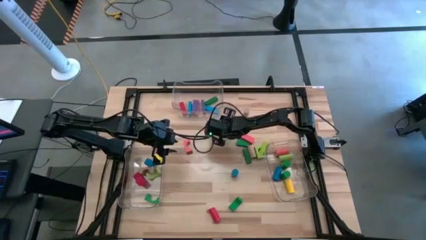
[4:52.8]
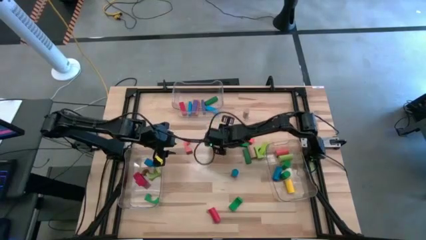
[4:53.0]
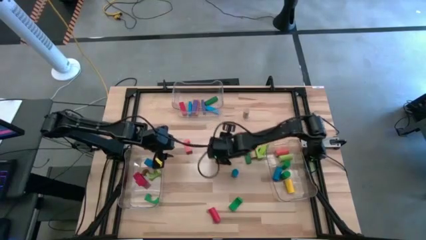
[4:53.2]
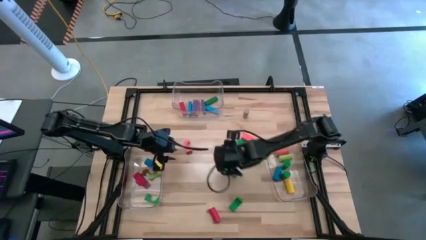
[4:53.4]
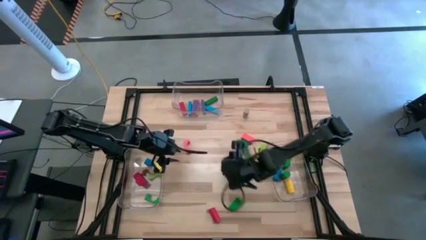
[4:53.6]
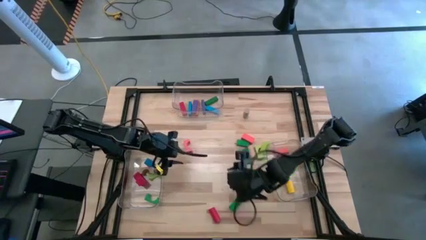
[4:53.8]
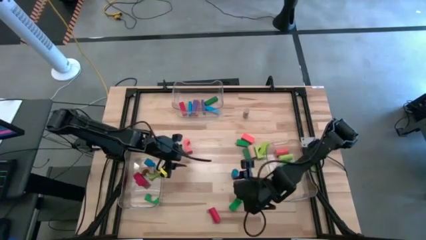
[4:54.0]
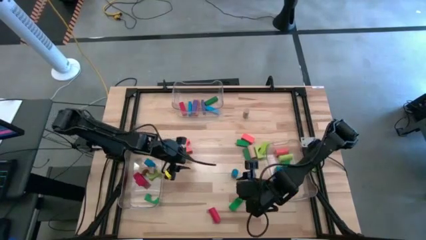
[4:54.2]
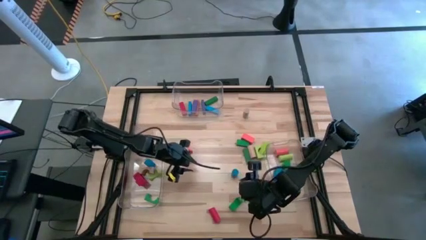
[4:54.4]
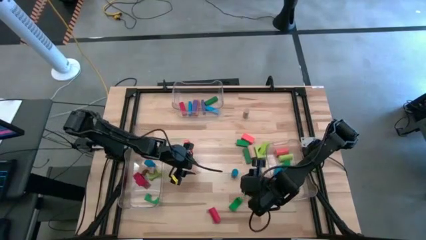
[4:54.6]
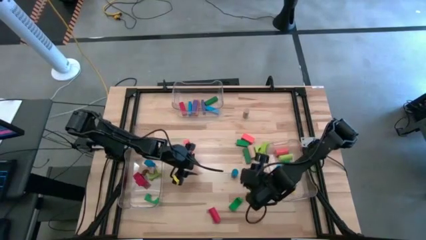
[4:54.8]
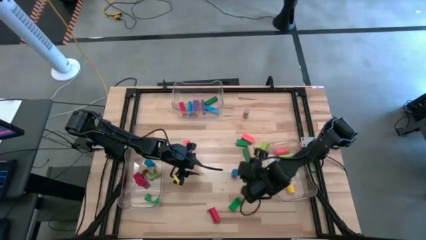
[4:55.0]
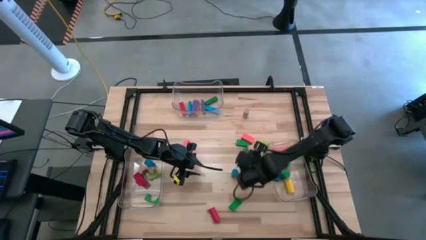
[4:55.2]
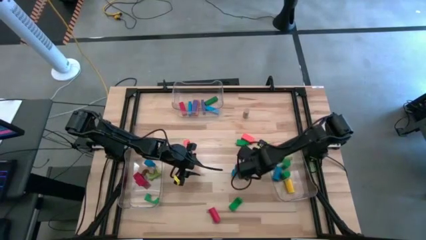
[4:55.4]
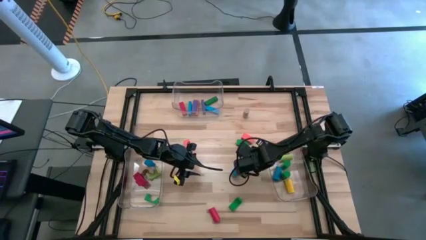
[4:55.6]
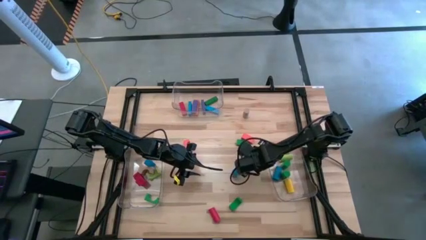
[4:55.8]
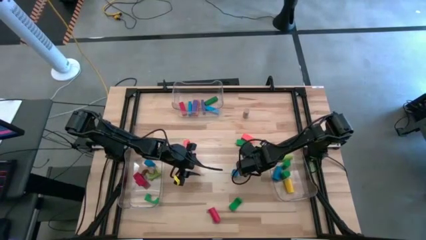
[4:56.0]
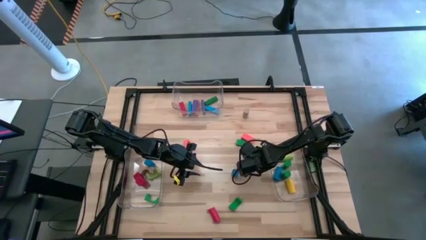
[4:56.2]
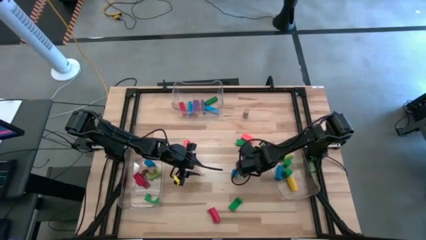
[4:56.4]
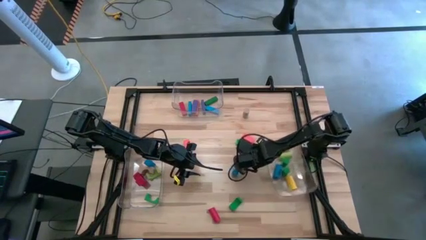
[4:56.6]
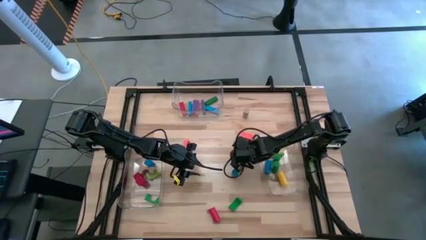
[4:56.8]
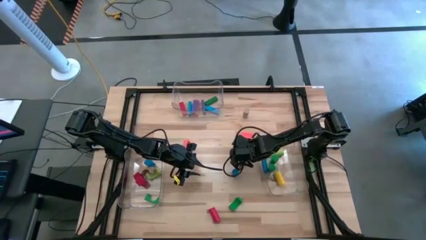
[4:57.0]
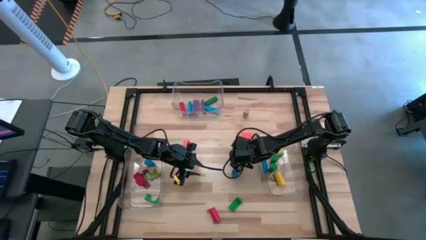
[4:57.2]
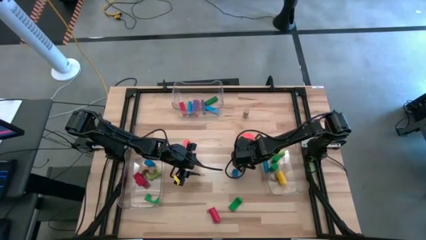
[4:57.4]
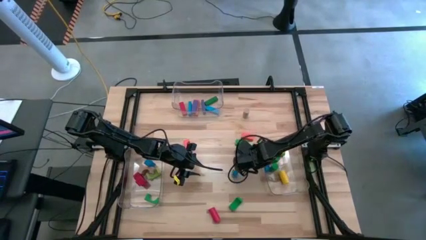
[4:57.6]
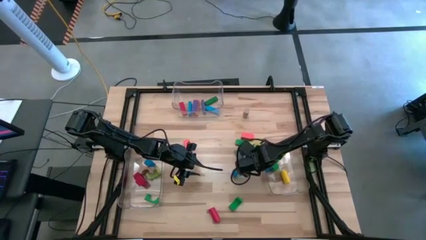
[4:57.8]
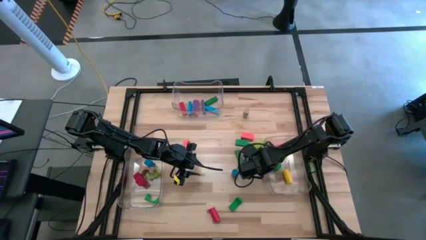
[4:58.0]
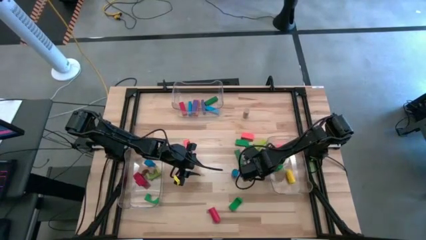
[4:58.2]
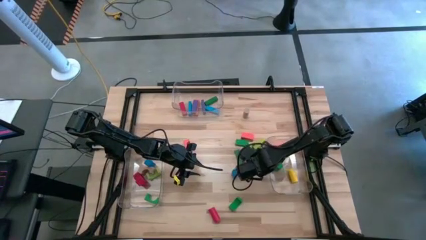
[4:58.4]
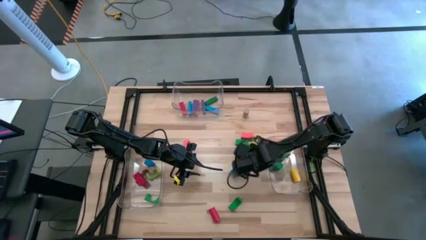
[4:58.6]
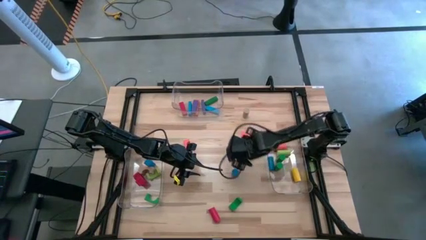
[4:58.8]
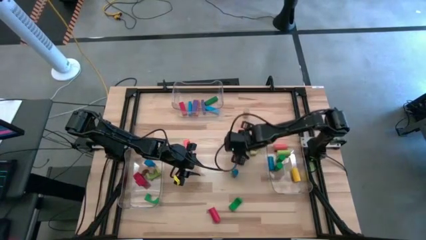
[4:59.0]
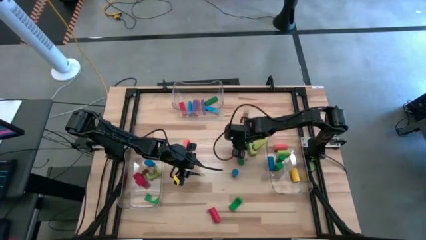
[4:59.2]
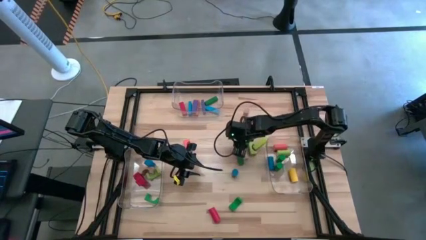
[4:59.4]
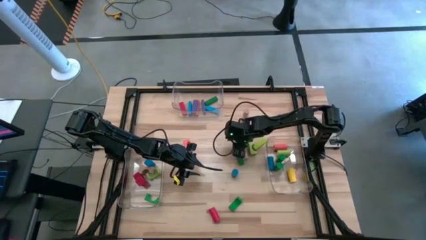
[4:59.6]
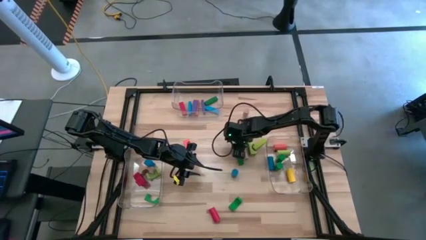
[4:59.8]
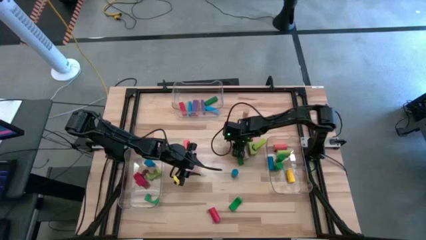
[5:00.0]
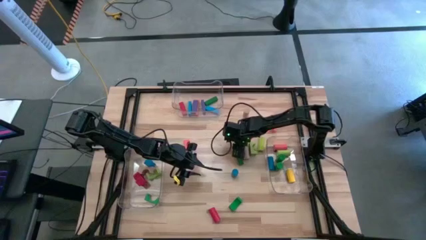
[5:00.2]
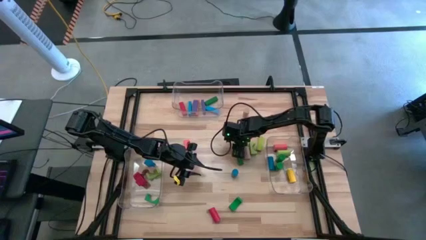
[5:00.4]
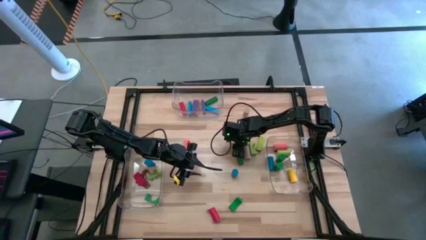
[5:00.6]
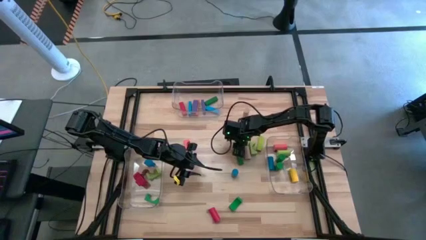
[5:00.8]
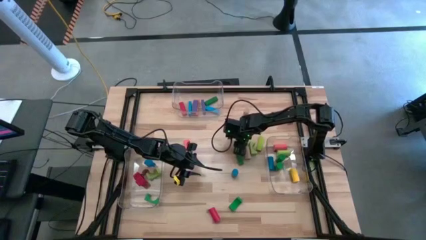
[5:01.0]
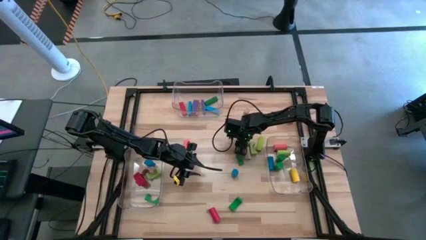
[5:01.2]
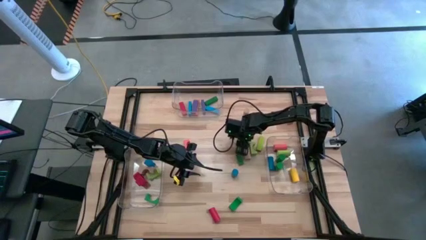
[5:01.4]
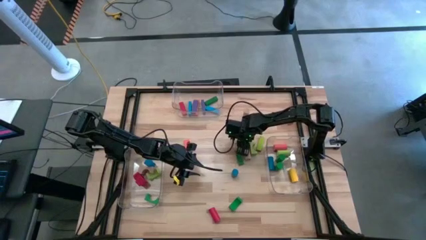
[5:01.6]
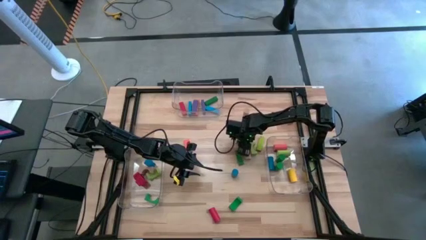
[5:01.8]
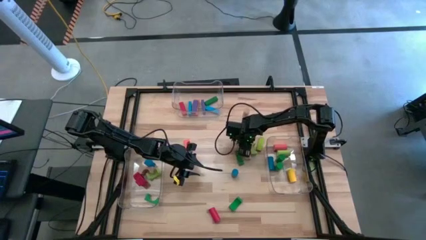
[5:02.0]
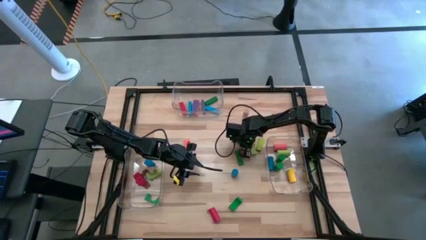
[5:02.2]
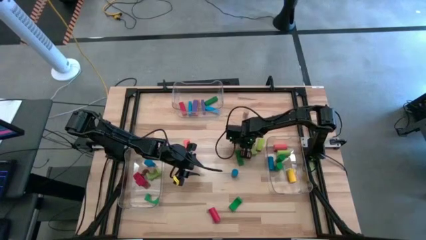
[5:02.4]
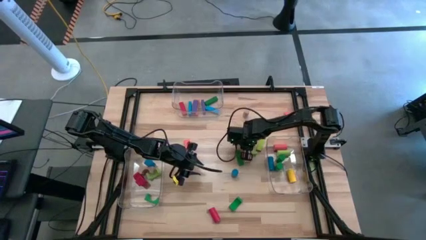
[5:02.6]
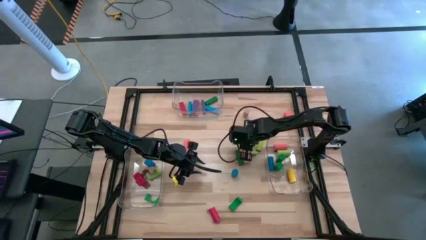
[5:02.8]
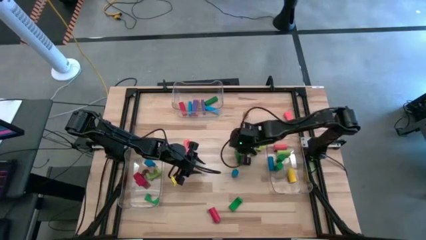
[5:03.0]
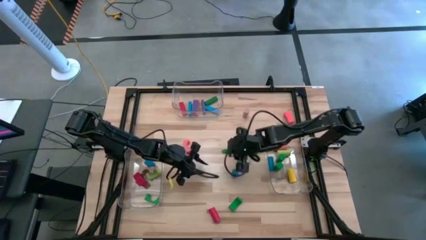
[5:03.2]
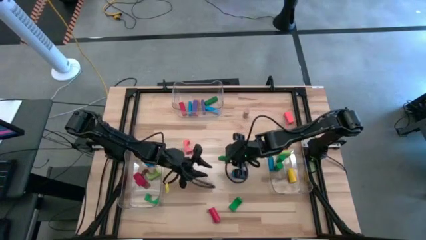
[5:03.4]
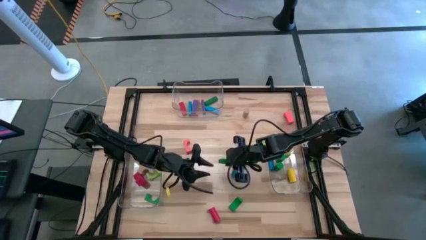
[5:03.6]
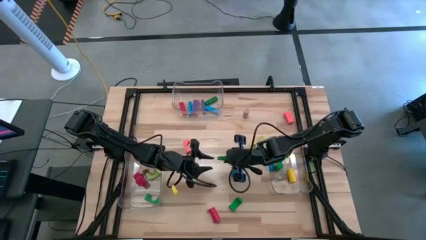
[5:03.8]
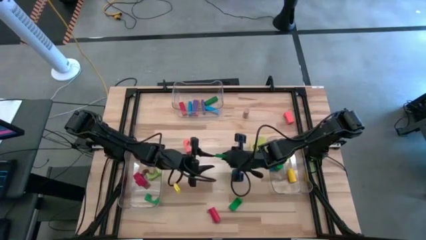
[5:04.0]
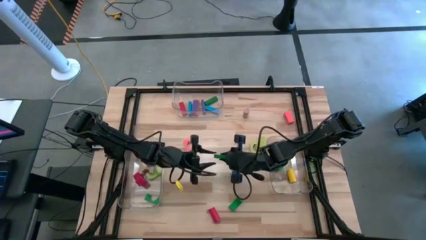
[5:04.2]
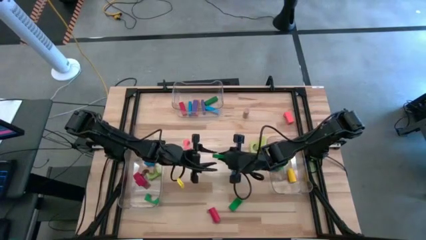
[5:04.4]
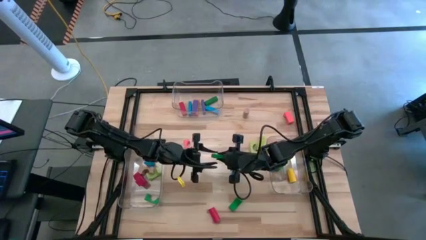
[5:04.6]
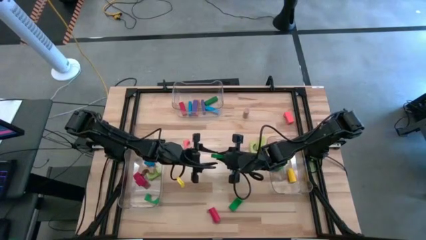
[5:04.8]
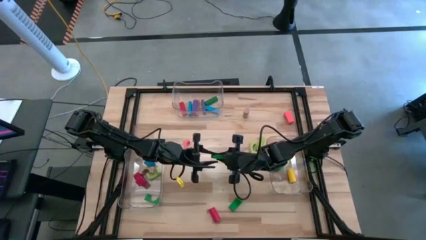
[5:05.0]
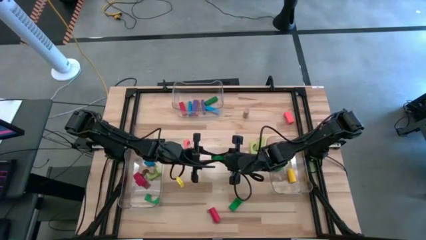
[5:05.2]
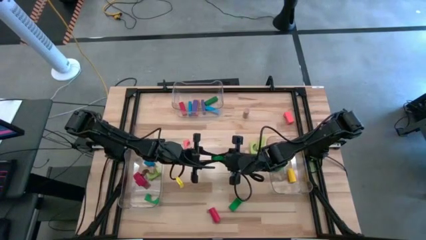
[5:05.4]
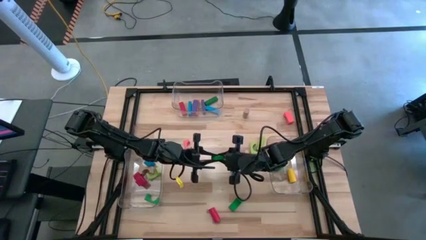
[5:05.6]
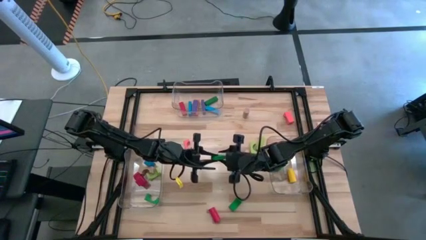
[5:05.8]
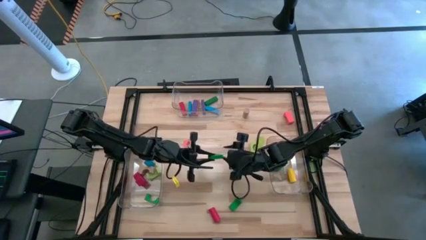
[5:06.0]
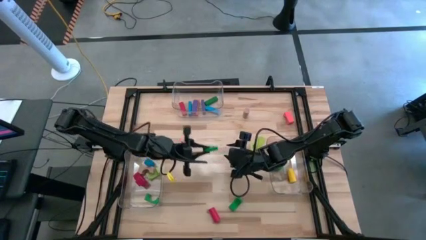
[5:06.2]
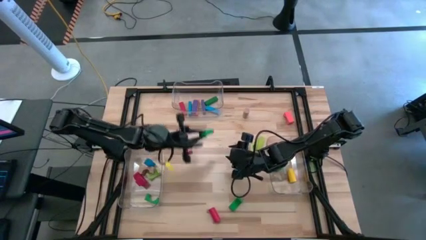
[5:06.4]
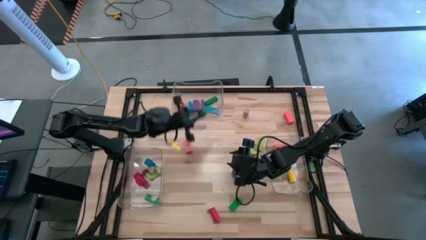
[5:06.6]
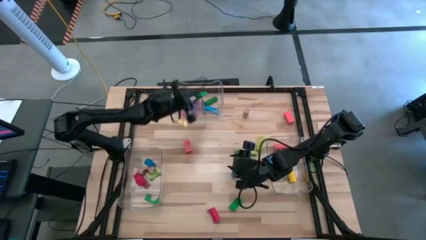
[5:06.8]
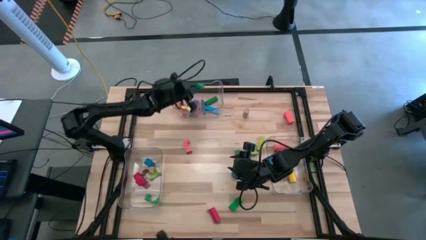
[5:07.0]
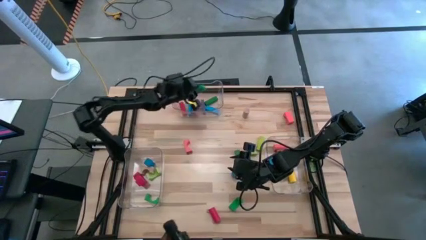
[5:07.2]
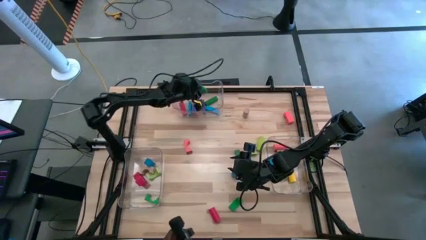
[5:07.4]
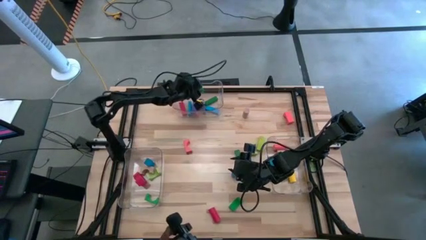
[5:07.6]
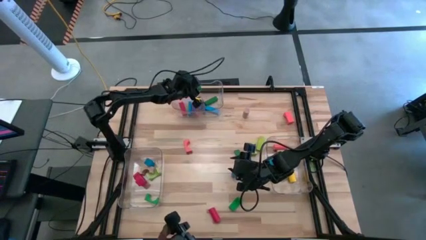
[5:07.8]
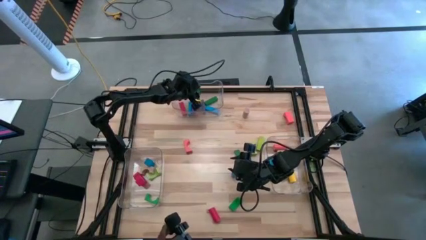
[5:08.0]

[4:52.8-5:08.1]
Task: Sort blocks by size
Put the green rectangular block into the top transparent bin
